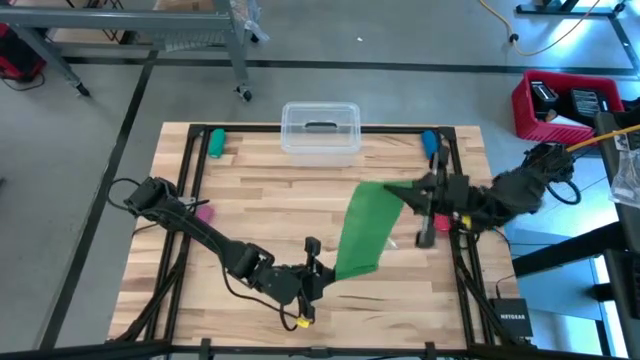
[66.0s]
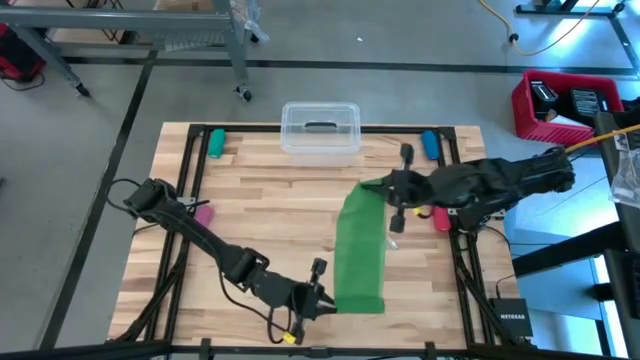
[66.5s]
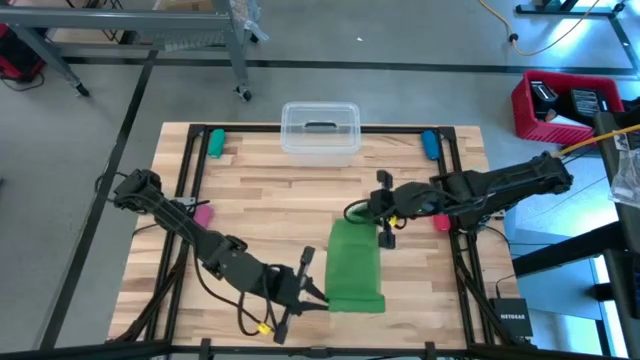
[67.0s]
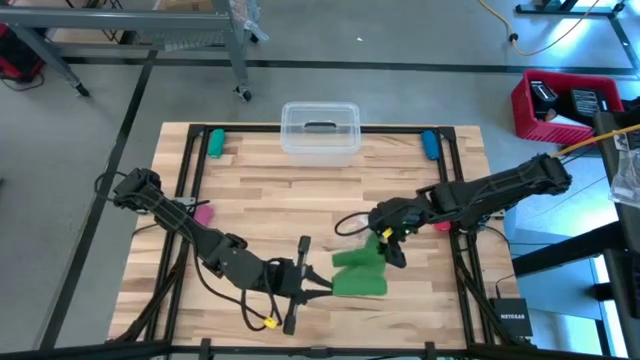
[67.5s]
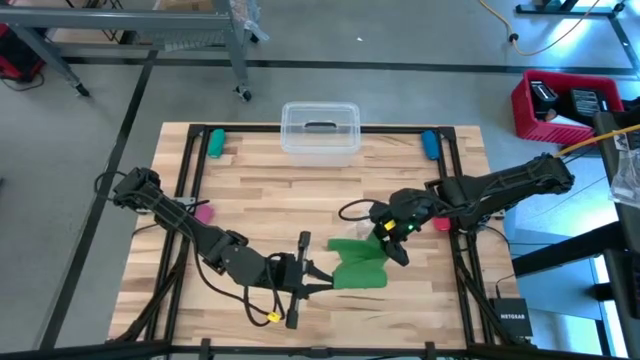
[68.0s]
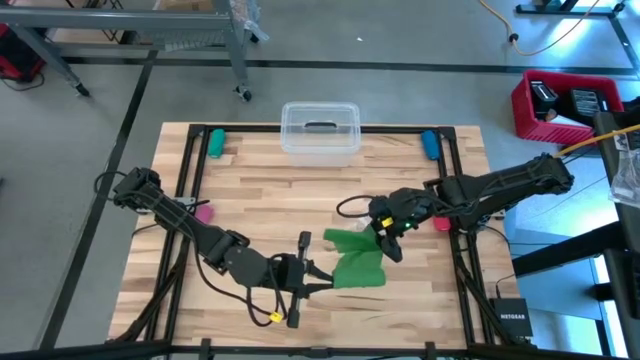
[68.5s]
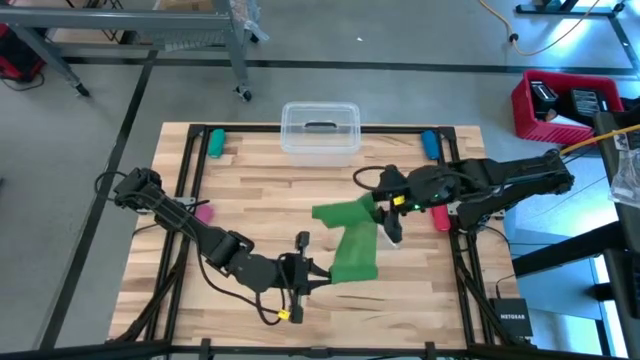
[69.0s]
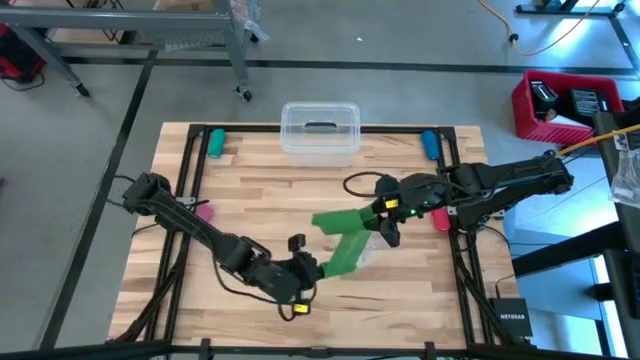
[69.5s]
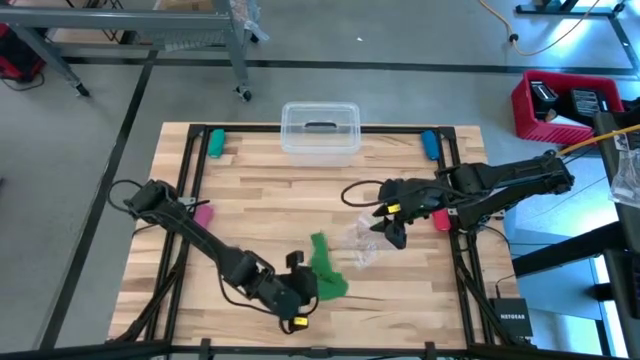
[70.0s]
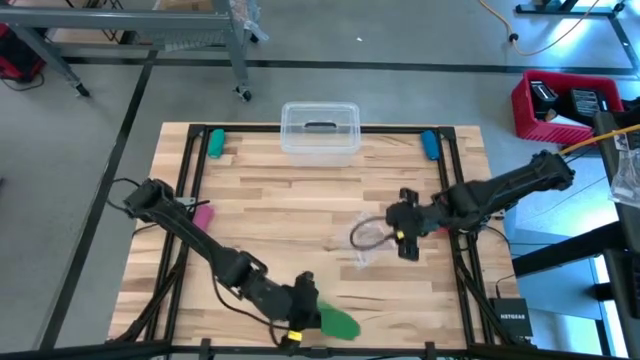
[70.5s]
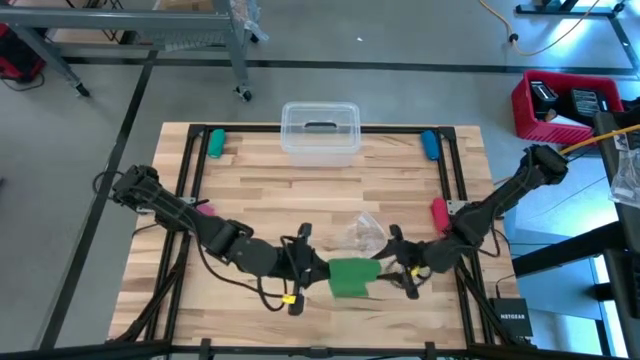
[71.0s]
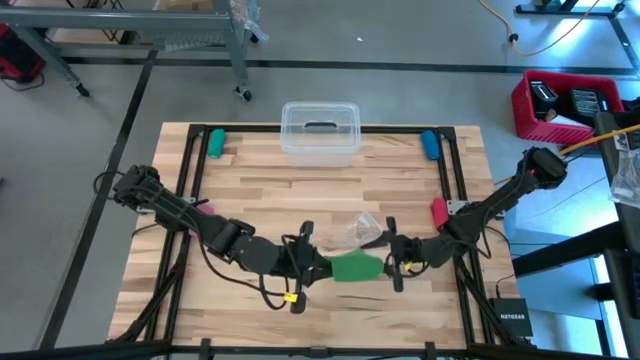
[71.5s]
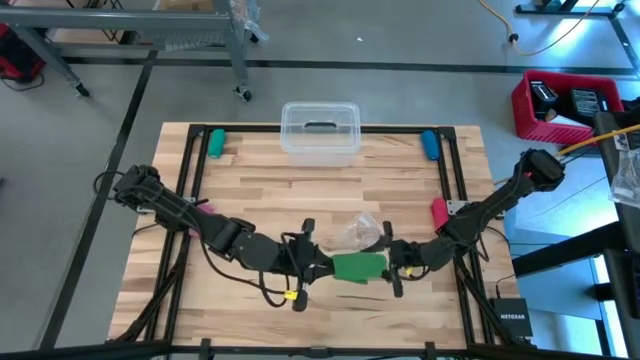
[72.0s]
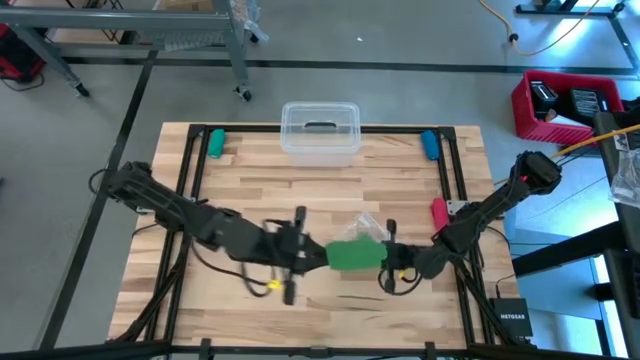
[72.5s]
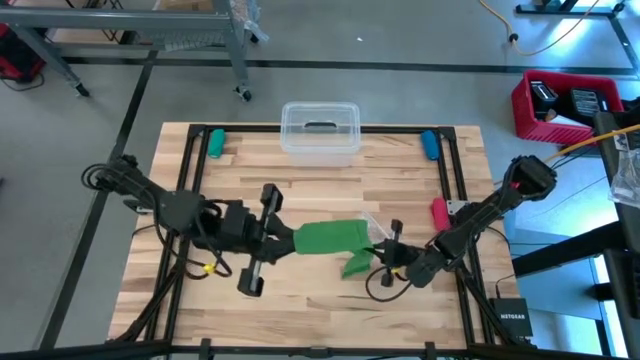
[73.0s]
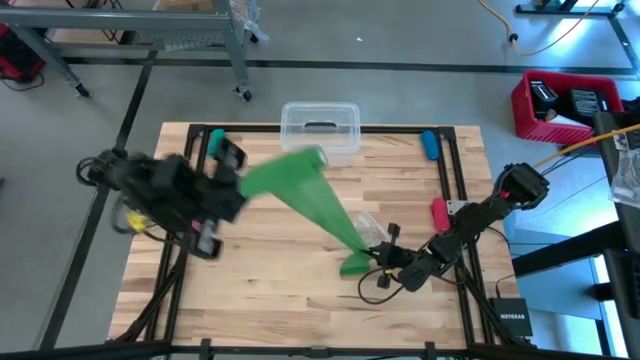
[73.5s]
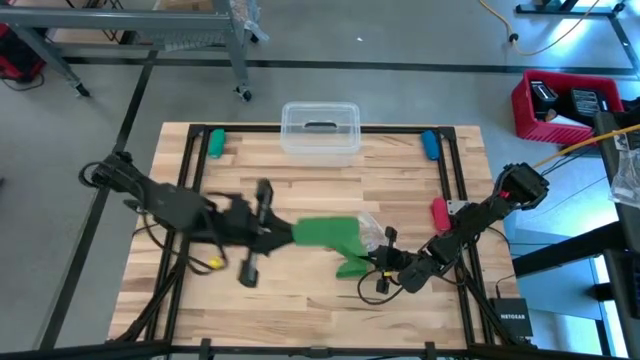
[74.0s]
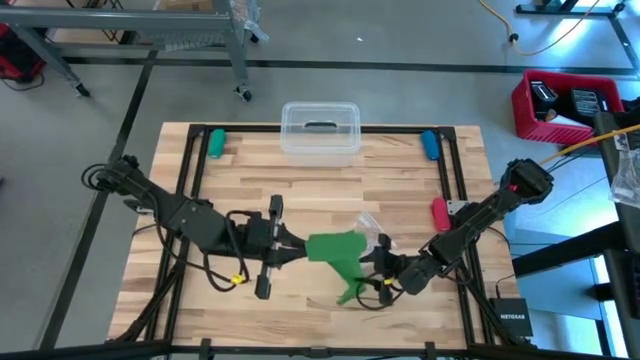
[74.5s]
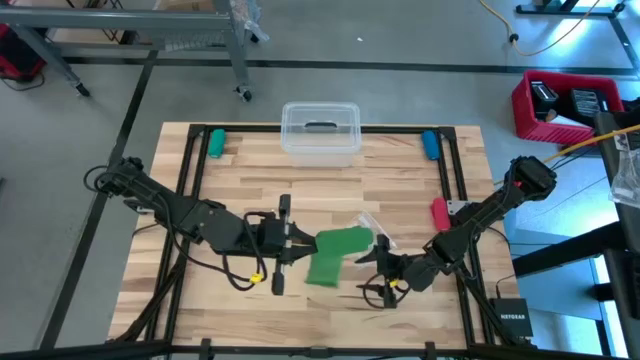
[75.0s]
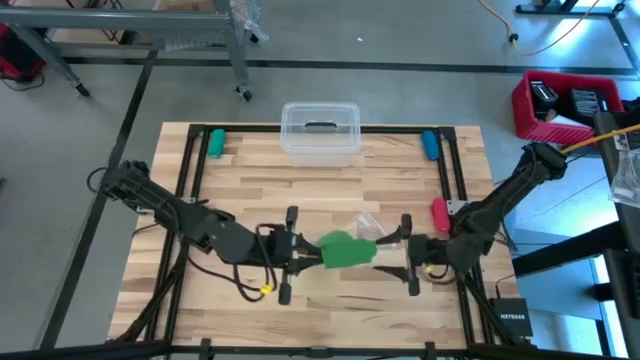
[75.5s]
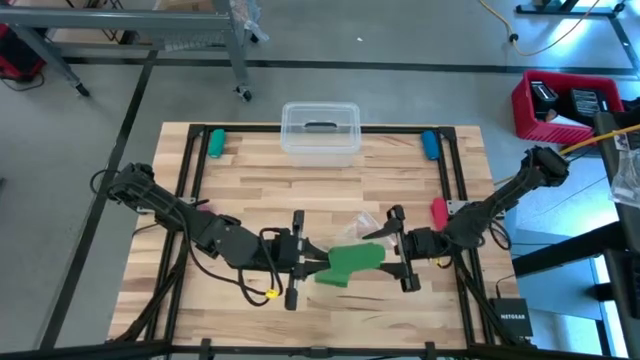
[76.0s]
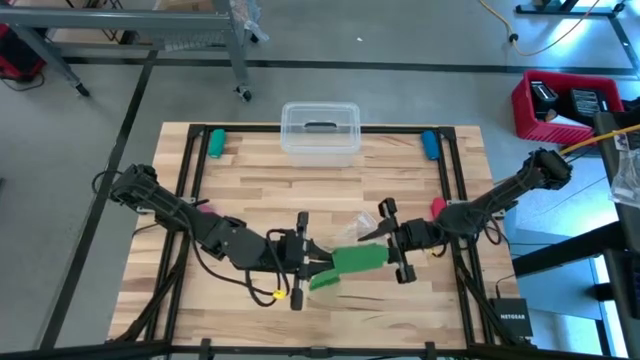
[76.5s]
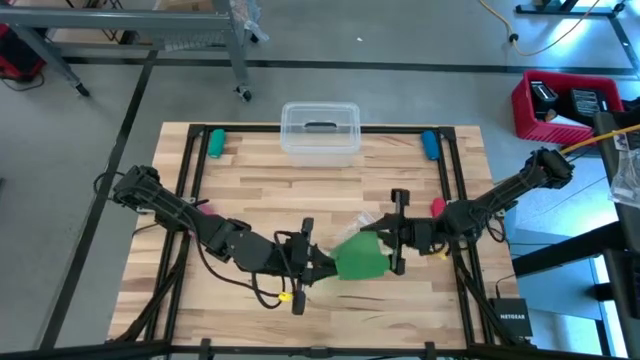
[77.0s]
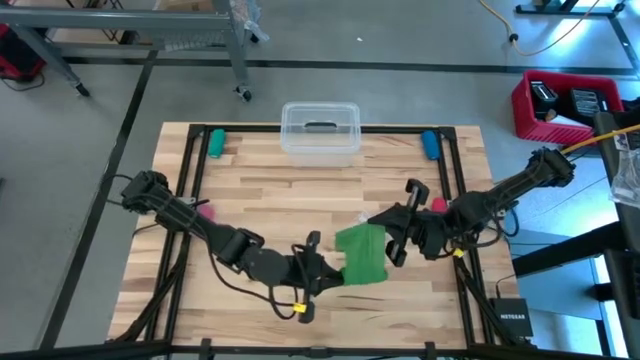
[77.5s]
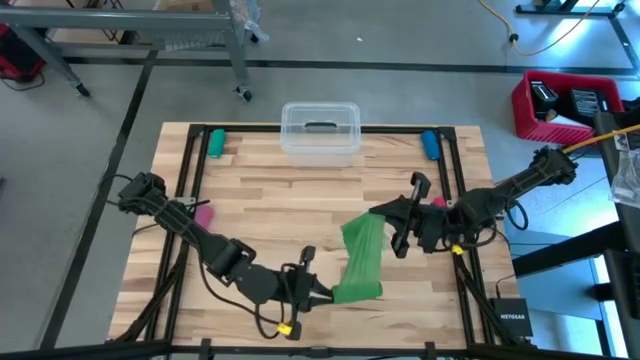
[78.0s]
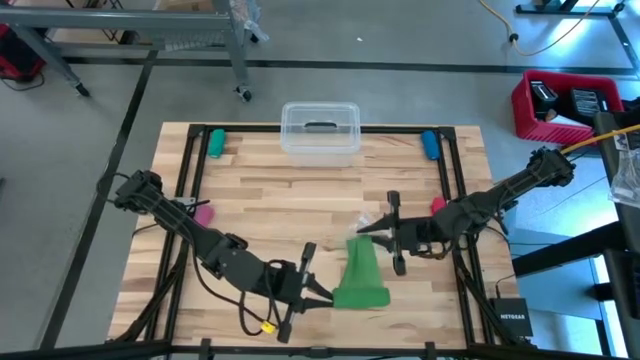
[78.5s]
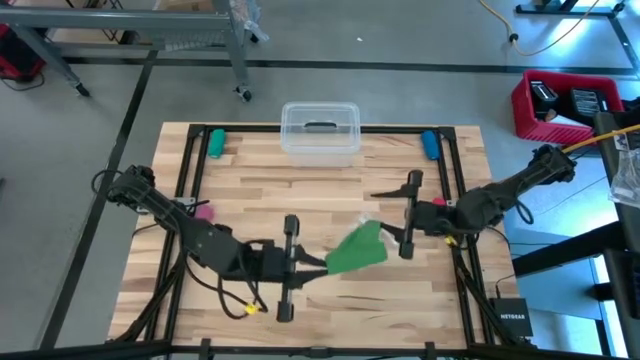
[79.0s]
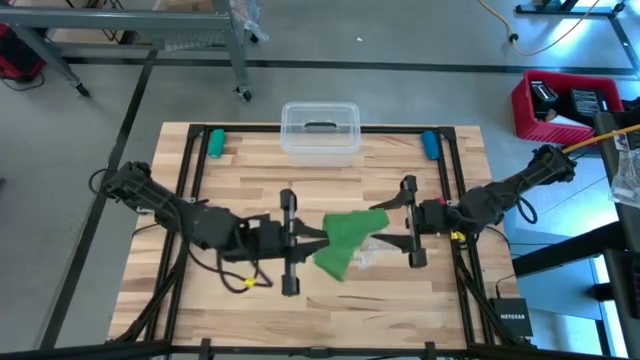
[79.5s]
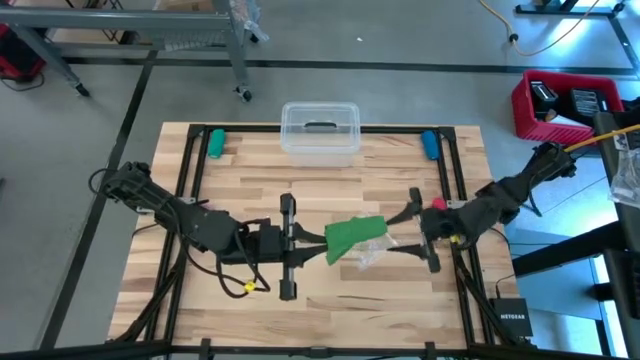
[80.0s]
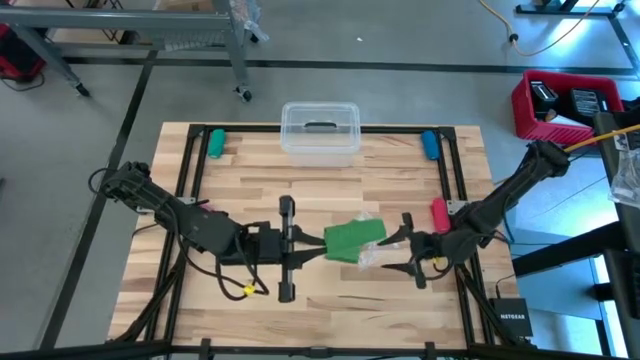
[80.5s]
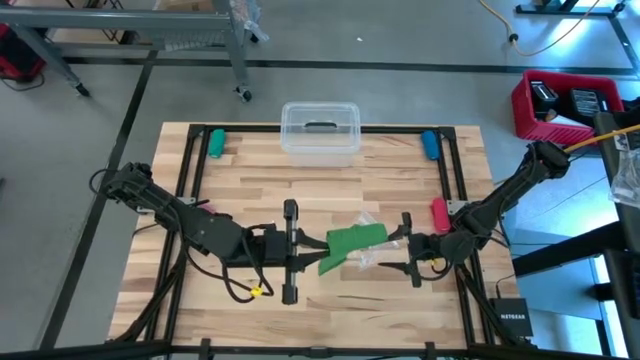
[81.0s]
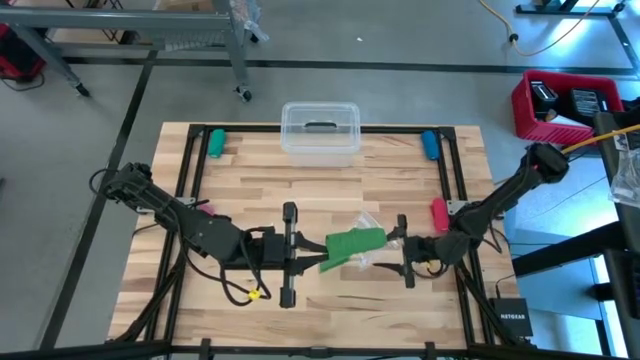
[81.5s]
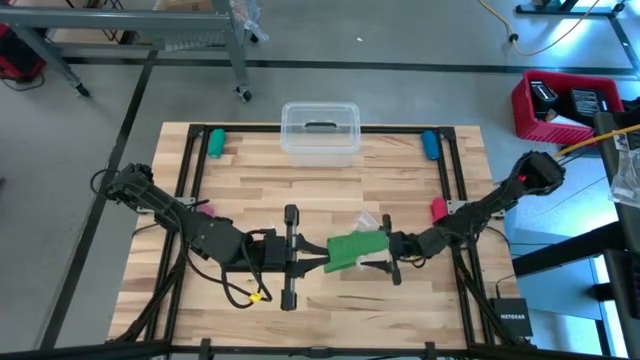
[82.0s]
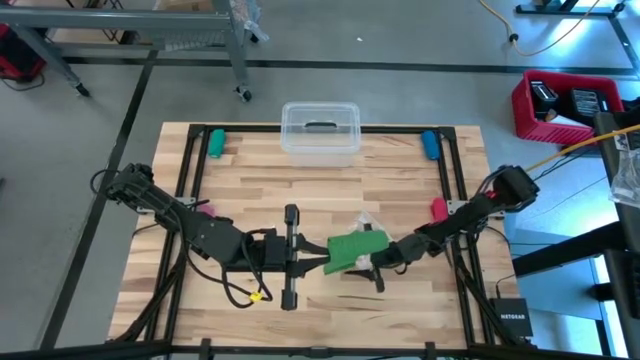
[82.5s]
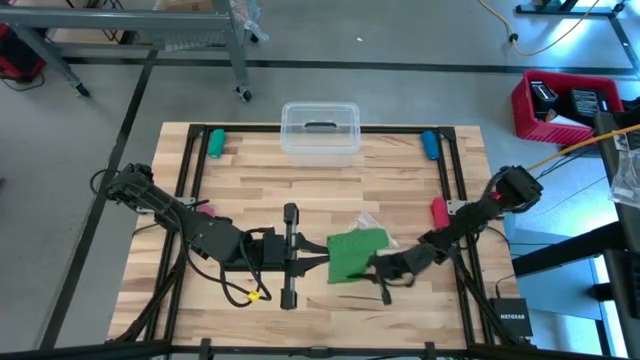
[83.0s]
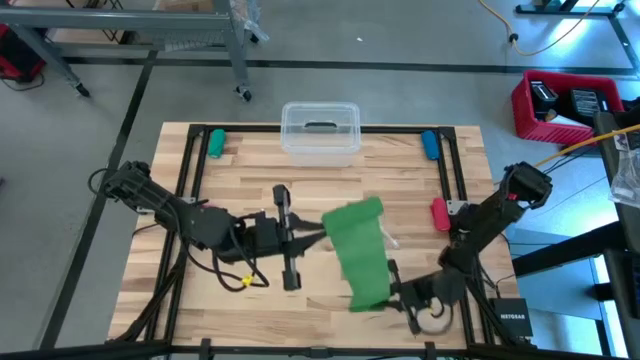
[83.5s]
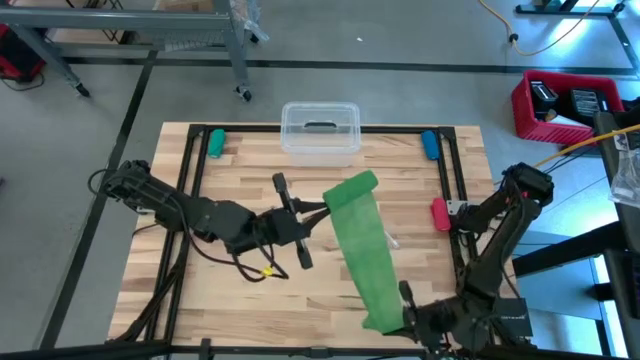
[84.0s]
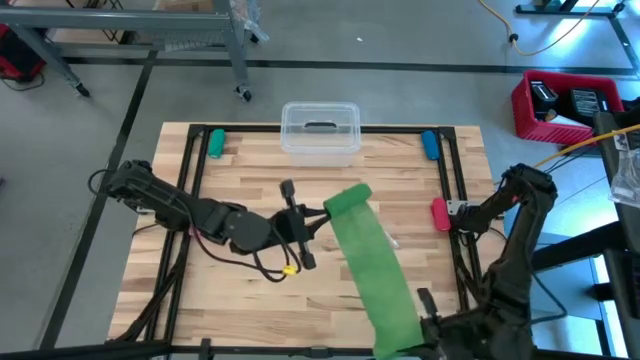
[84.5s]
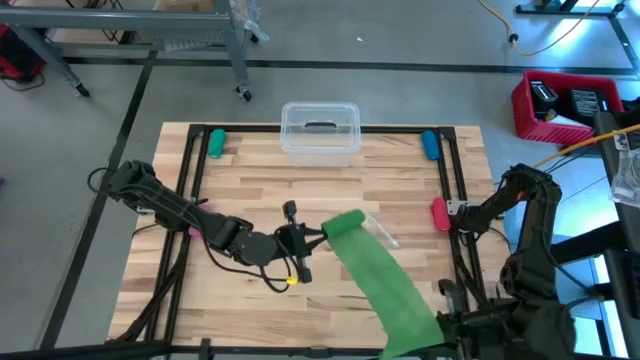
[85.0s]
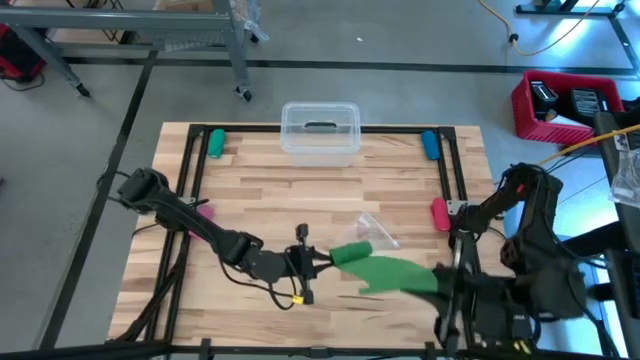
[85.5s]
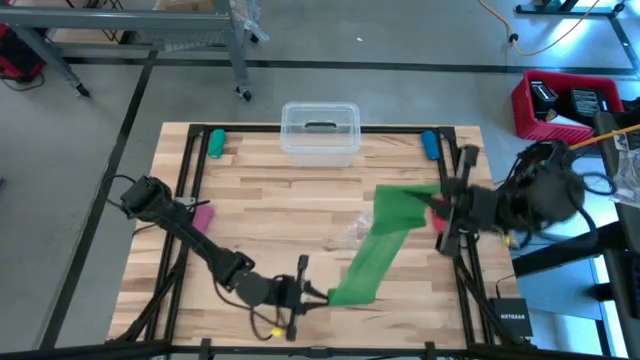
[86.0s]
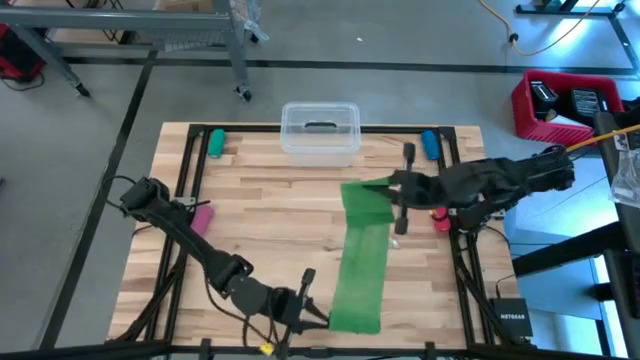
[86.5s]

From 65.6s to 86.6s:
Task: Roll bandage
Roll the green bandage

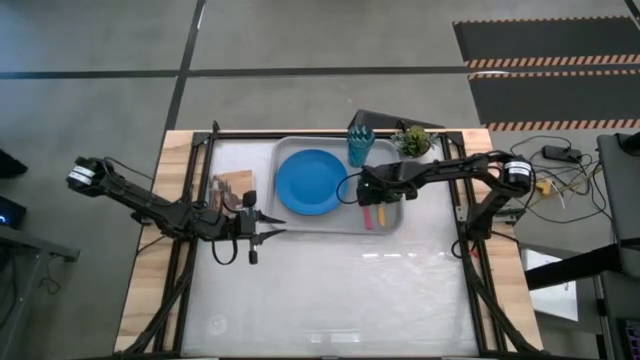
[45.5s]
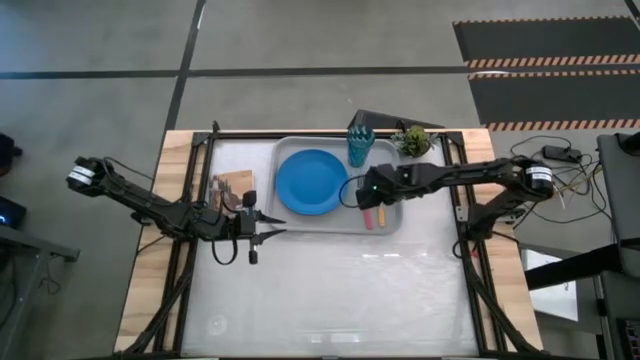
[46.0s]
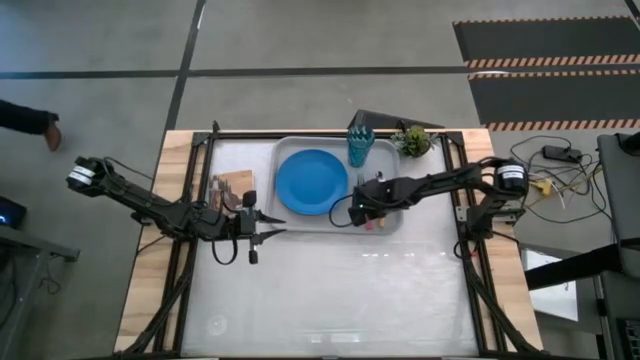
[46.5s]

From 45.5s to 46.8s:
Task: Pick and place plate/cup/fork/spoon on tray
Adjust the red fork on the gray tray
